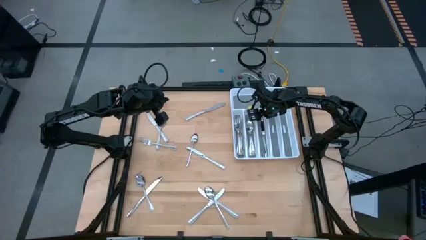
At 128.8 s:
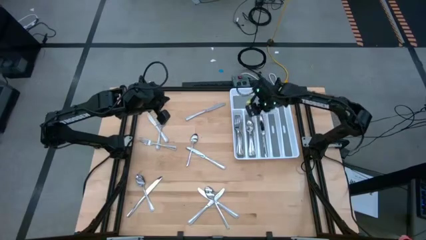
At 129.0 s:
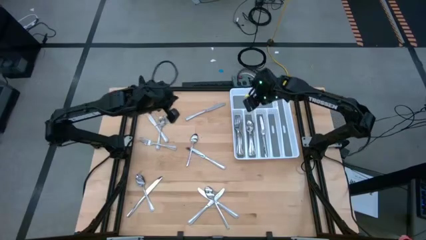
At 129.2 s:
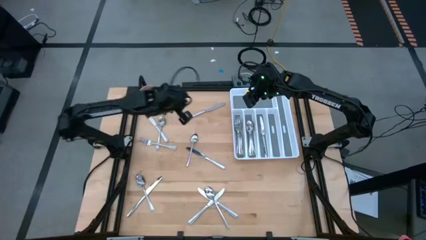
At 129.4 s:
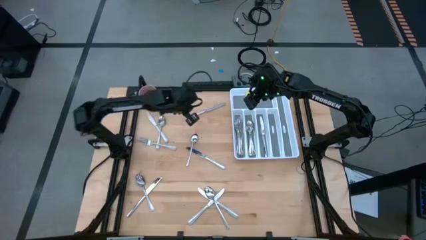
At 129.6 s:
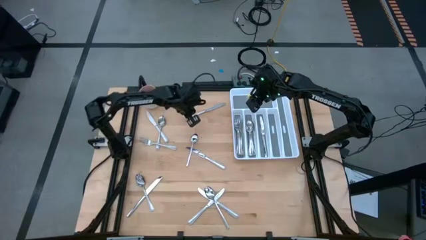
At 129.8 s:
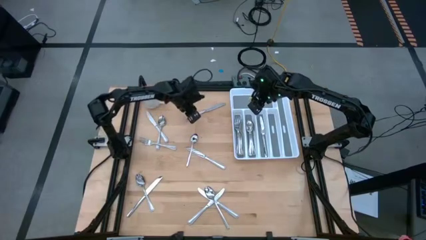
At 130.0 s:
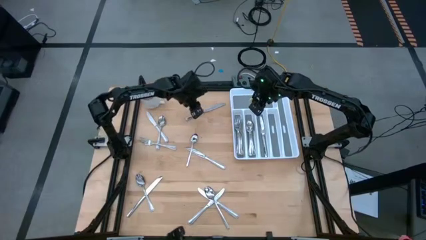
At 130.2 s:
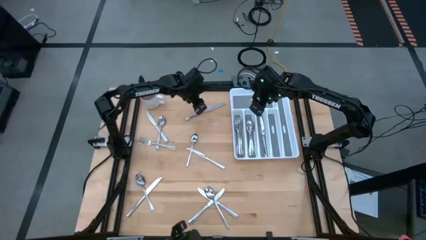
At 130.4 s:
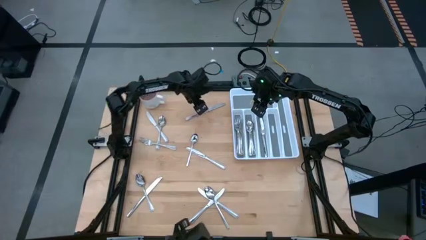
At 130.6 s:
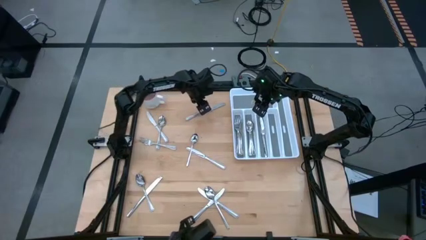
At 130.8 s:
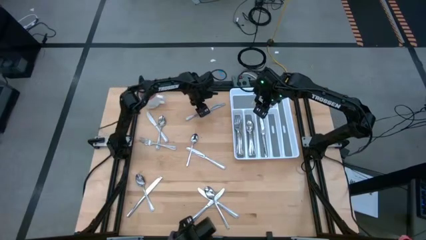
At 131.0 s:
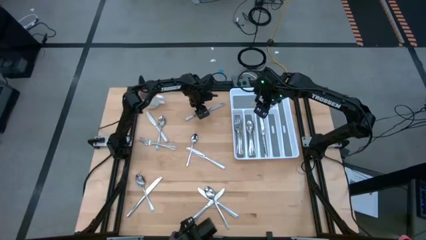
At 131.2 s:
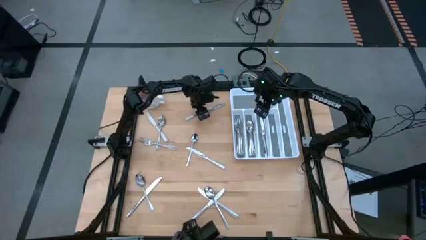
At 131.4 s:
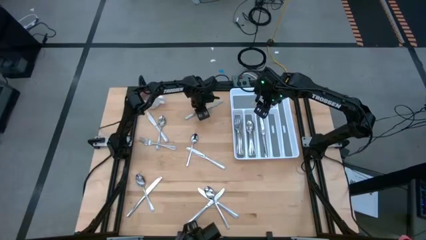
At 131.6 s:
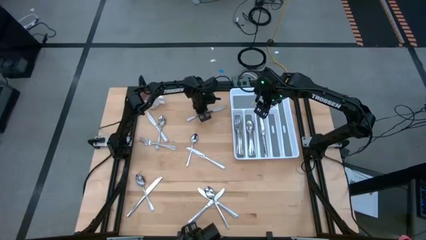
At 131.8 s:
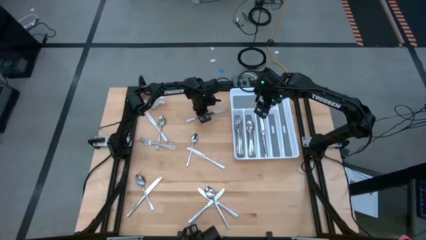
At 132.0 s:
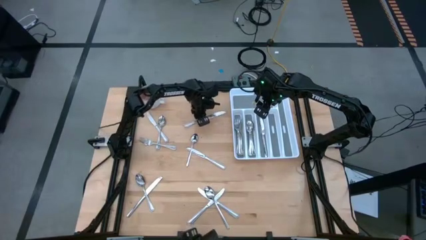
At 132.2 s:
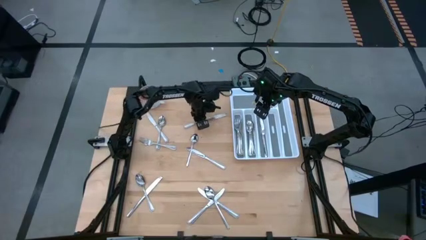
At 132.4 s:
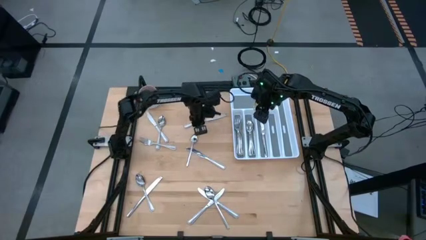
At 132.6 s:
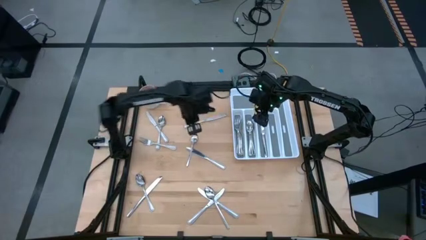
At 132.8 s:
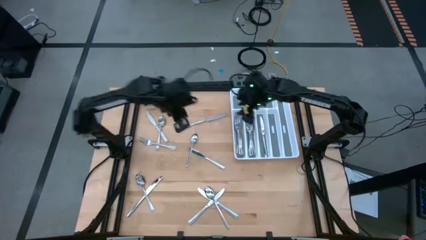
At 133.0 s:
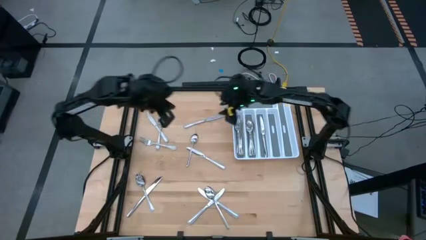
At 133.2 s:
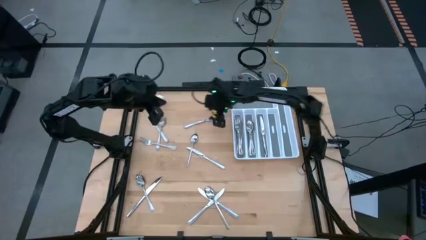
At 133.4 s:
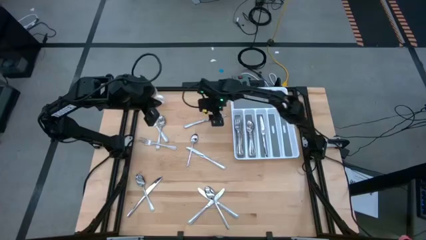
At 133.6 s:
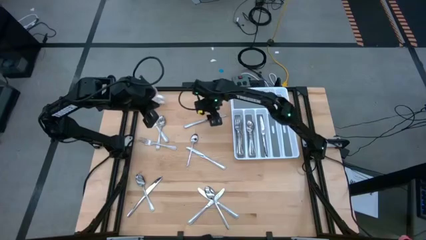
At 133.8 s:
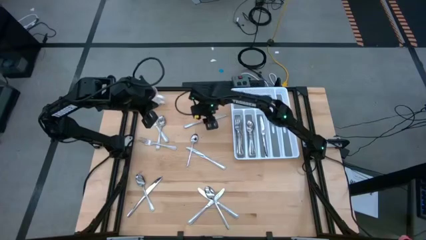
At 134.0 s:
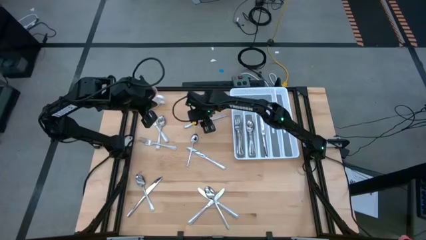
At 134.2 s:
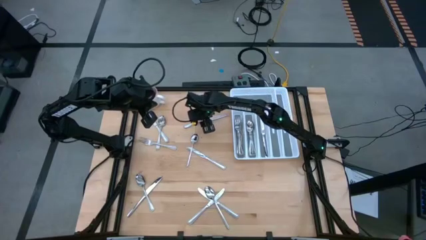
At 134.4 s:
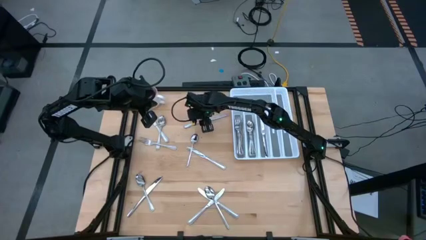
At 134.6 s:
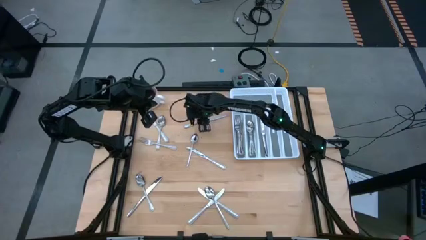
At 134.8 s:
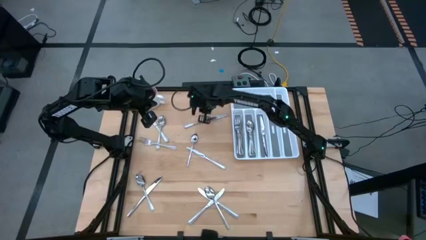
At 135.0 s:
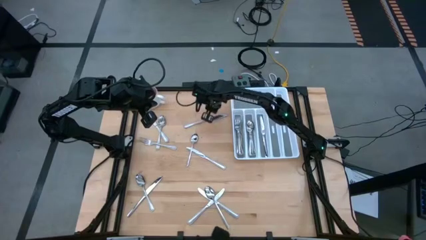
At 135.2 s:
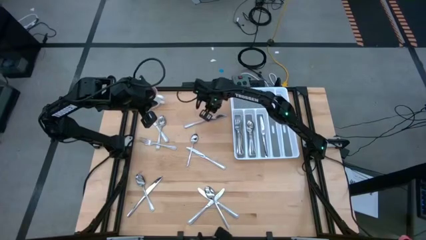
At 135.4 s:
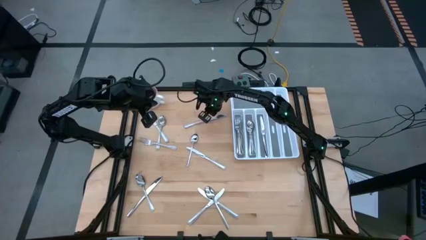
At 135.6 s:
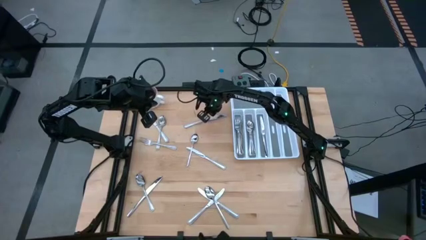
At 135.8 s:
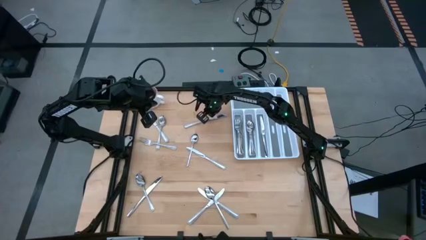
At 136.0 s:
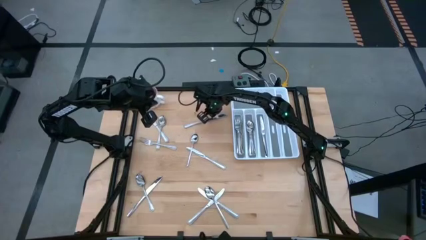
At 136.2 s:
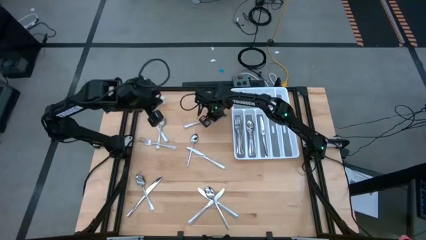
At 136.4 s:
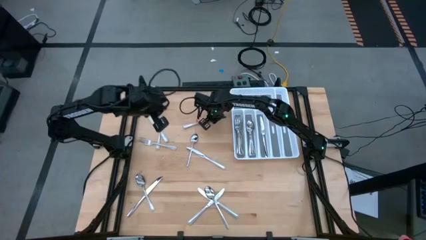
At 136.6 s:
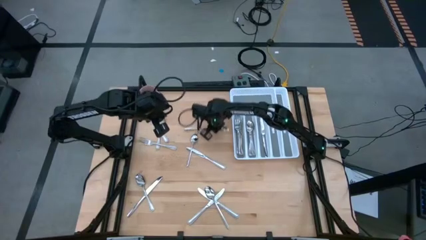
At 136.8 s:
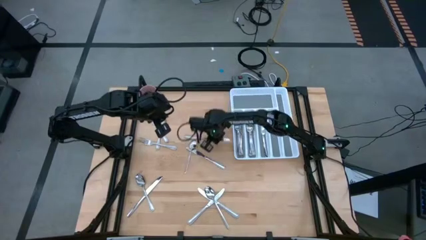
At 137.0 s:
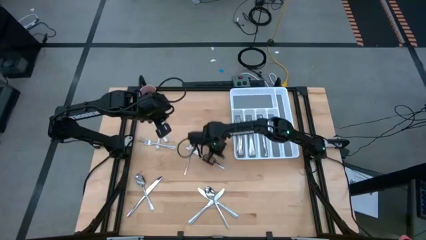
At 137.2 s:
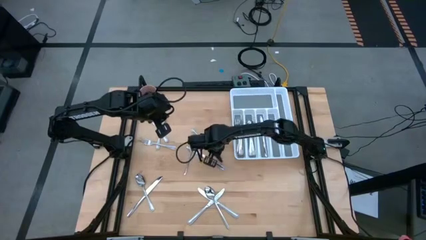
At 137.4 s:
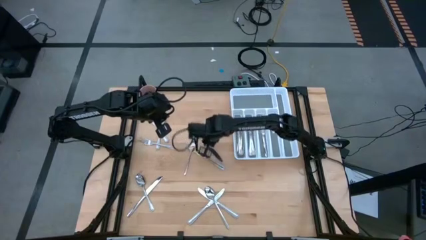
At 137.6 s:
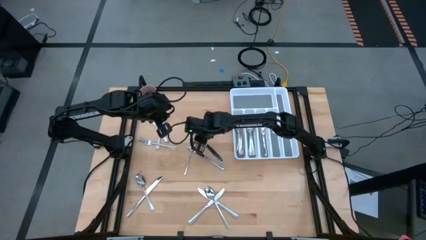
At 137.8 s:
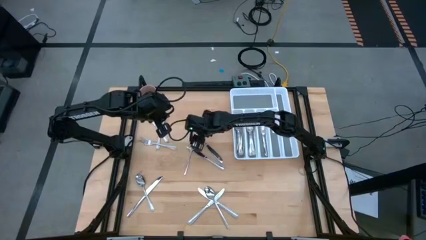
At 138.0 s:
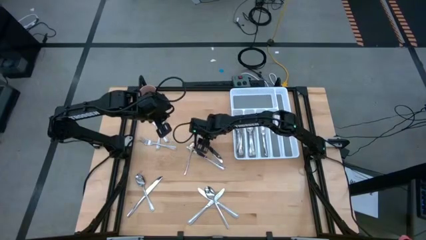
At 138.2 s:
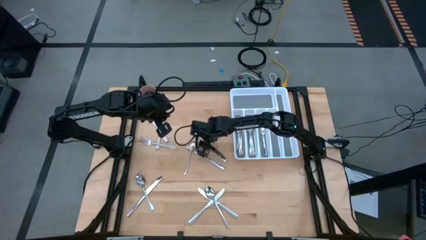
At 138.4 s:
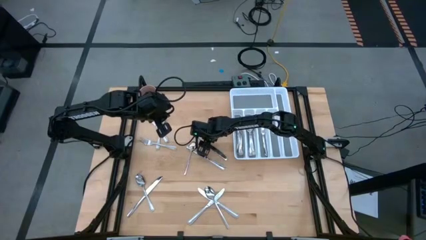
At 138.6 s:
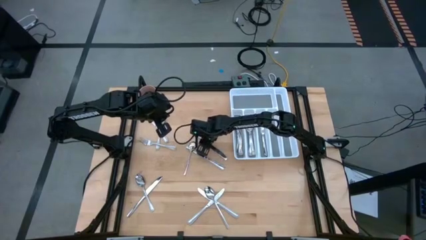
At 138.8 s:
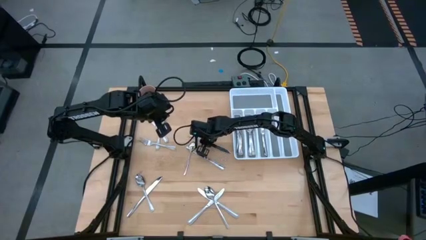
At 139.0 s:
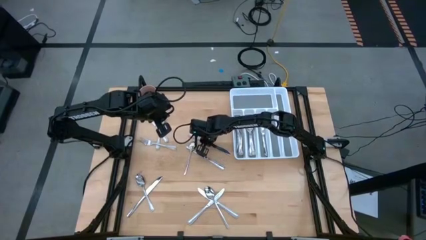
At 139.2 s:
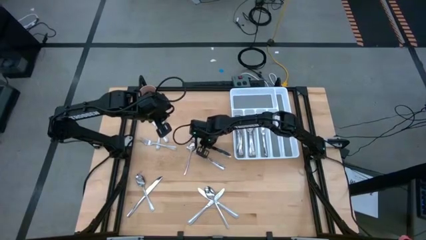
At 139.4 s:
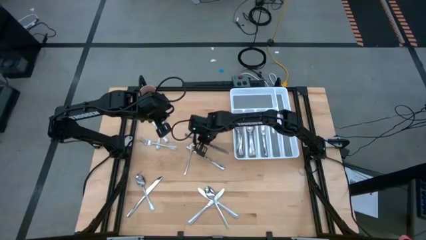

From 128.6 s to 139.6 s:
Task: Sort silverware
Put the silver table knife into the silverware tray

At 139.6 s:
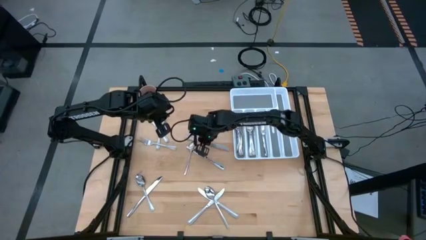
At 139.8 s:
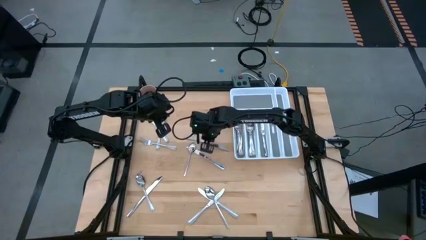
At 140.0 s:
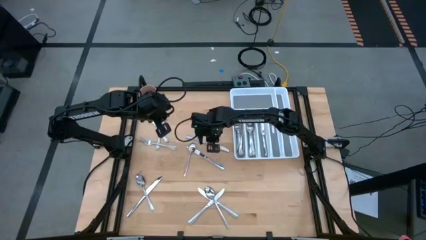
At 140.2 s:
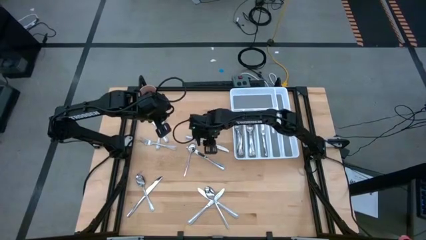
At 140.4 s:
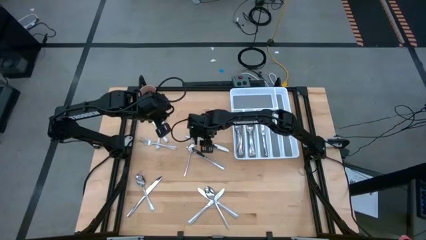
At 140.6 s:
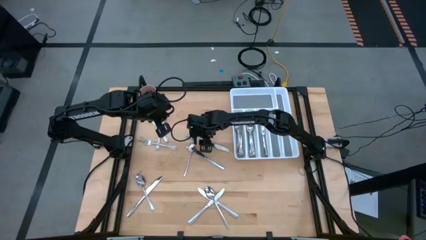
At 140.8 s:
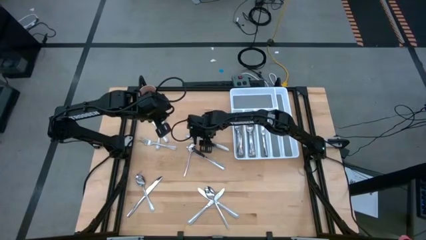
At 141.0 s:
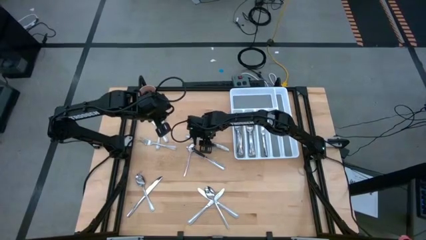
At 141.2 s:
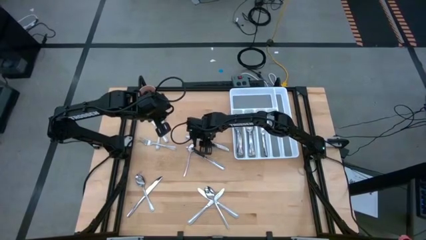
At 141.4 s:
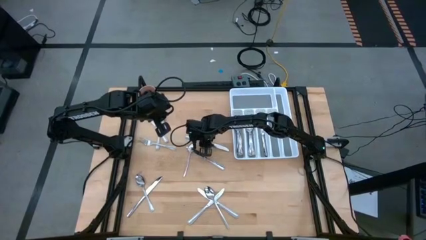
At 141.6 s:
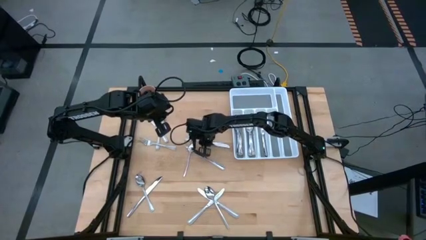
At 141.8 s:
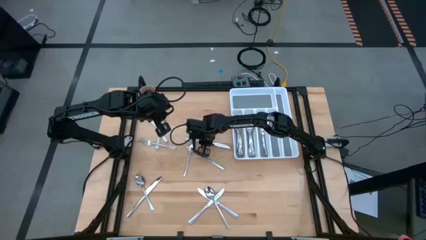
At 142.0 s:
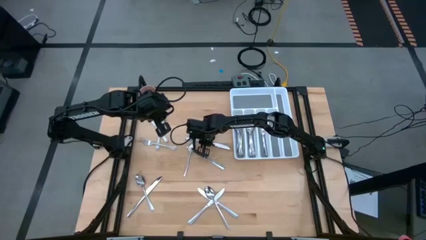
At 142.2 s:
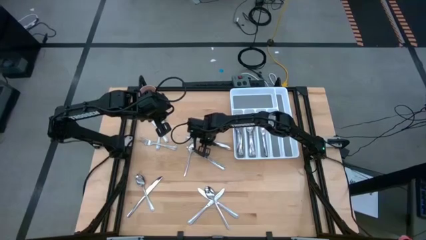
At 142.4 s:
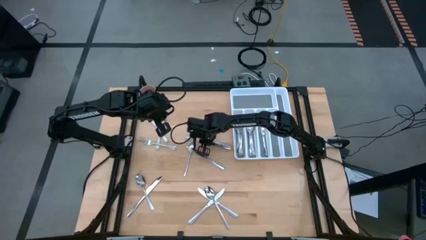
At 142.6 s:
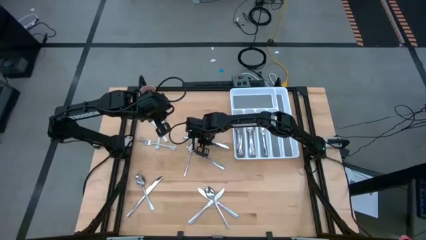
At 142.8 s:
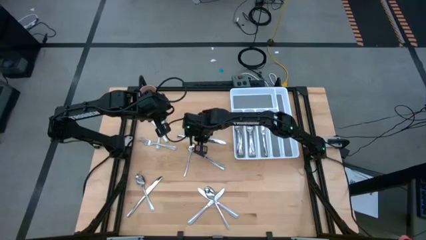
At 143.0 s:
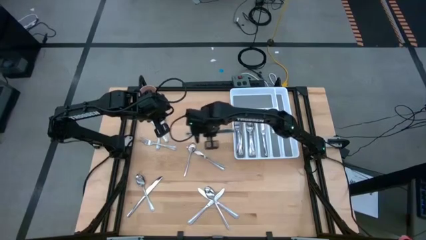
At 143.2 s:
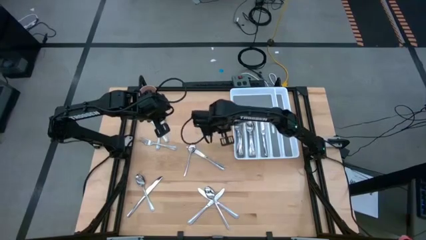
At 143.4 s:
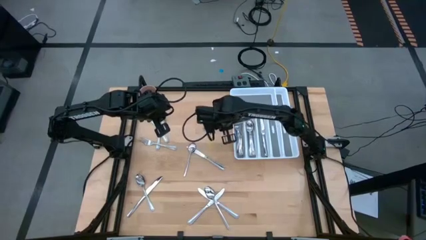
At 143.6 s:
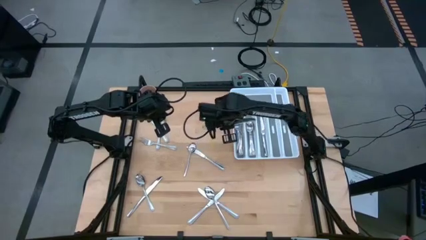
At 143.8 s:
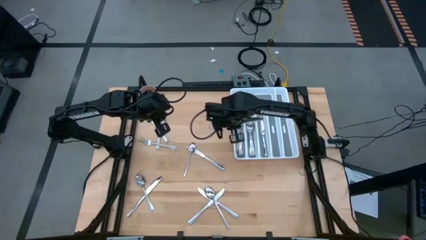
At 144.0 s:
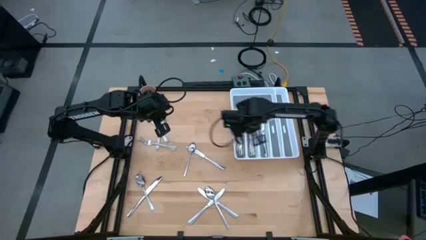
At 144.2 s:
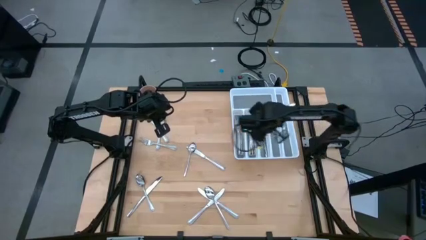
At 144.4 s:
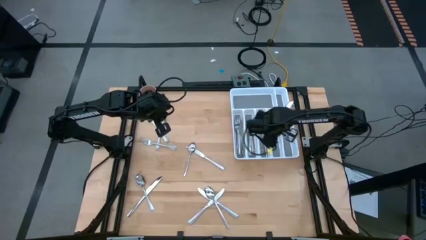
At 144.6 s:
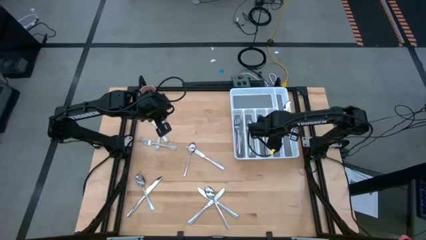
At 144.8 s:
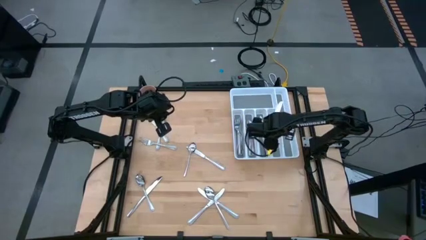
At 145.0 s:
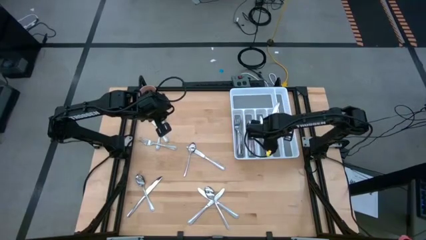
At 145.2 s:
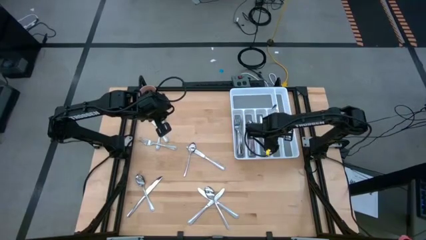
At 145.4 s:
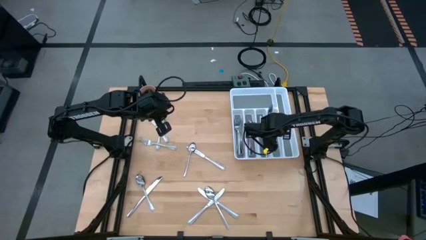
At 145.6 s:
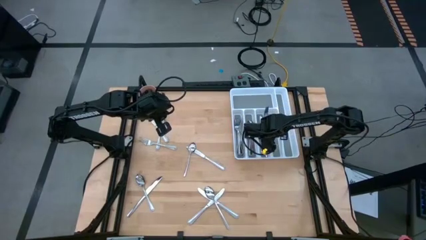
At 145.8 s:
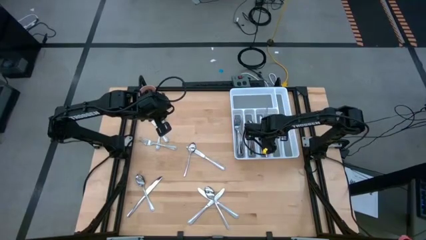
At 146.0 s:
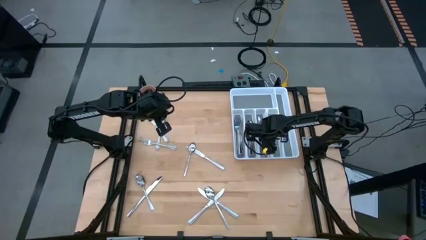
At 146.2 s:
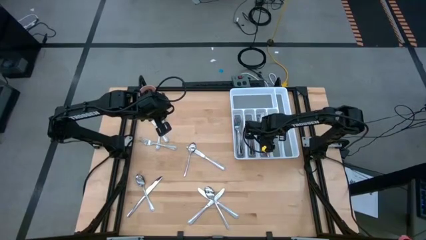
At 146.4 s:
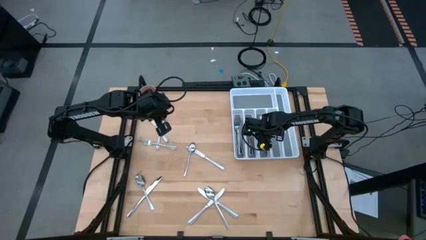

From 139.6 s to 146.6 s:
Put the silver table knife into the silverware tray
